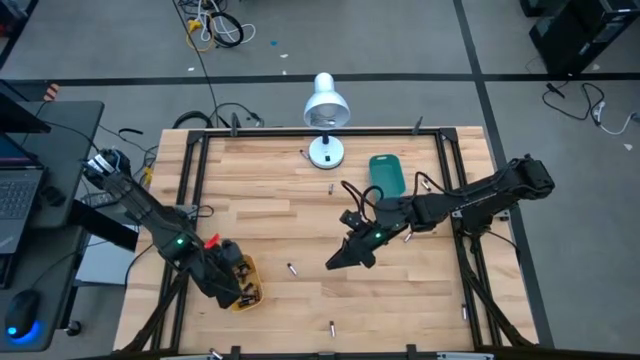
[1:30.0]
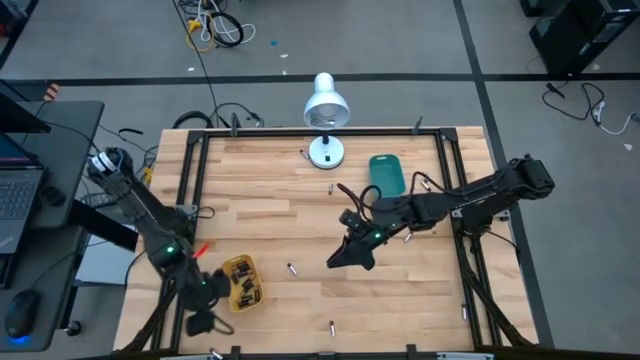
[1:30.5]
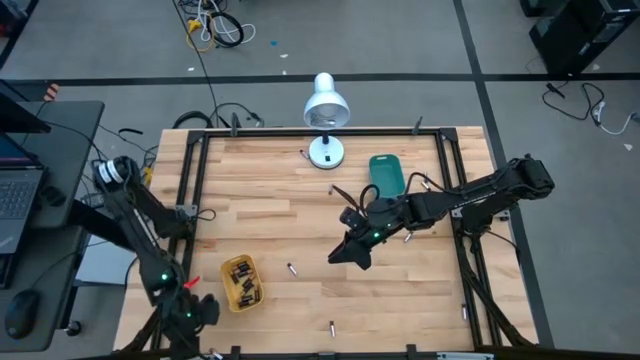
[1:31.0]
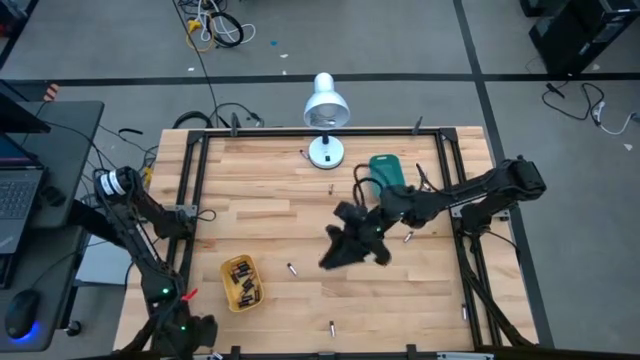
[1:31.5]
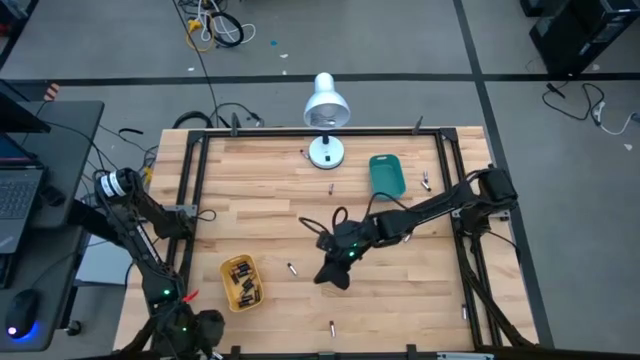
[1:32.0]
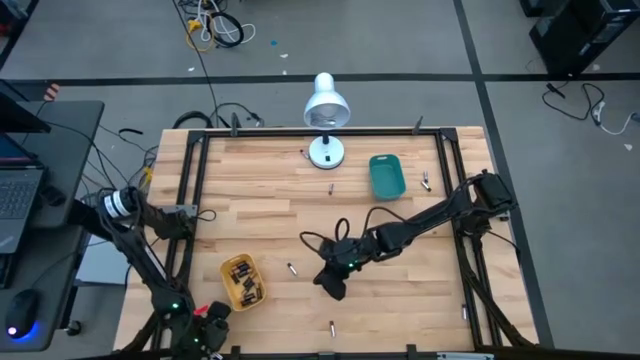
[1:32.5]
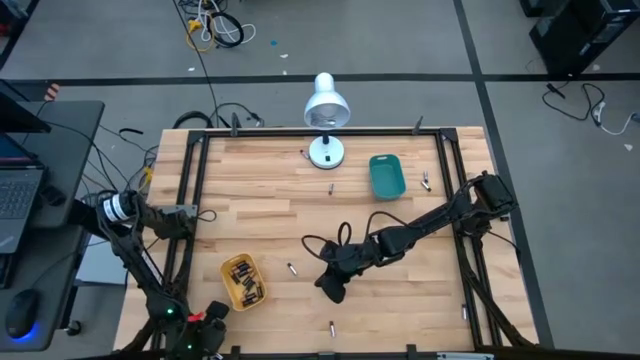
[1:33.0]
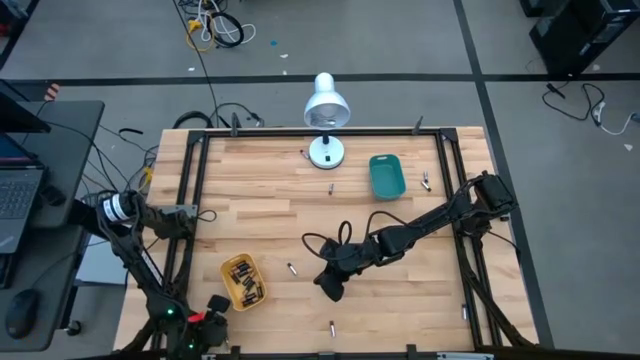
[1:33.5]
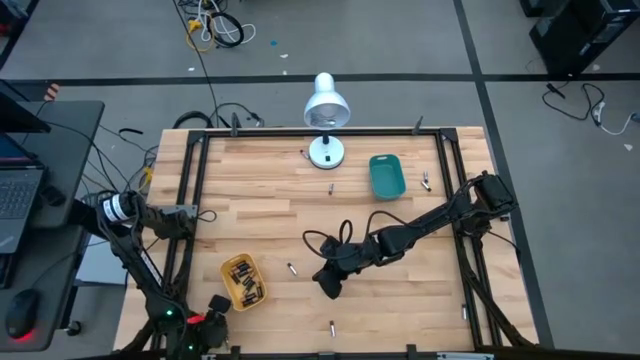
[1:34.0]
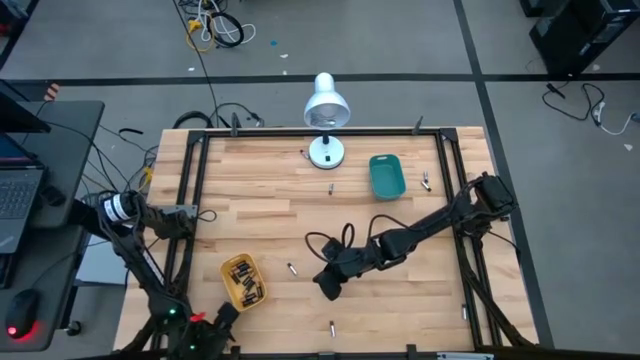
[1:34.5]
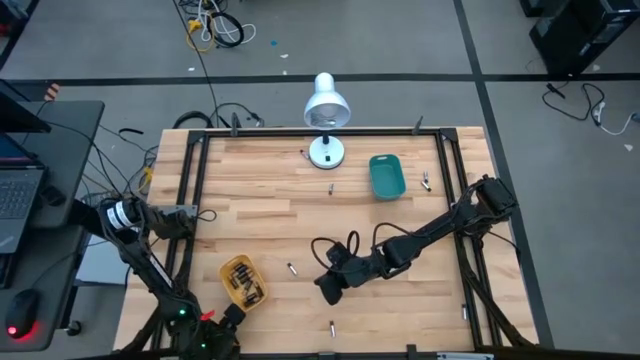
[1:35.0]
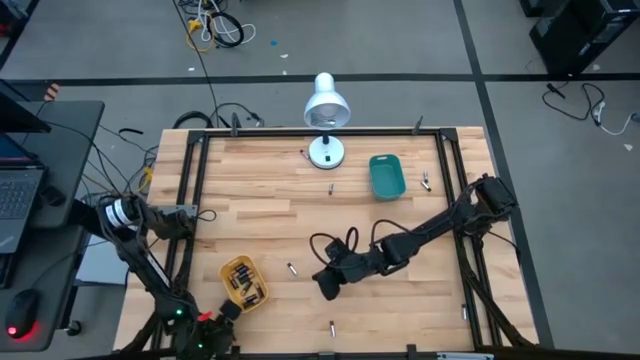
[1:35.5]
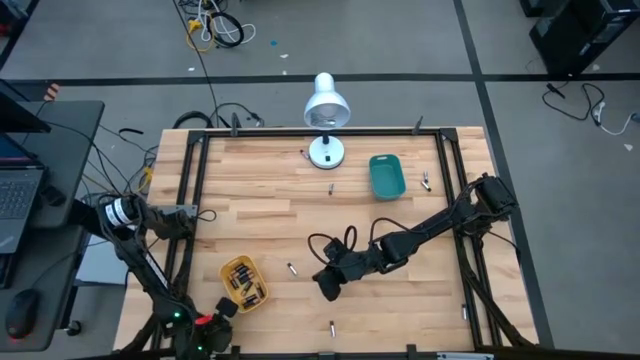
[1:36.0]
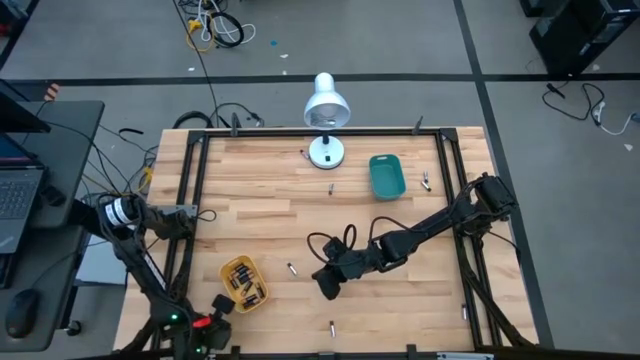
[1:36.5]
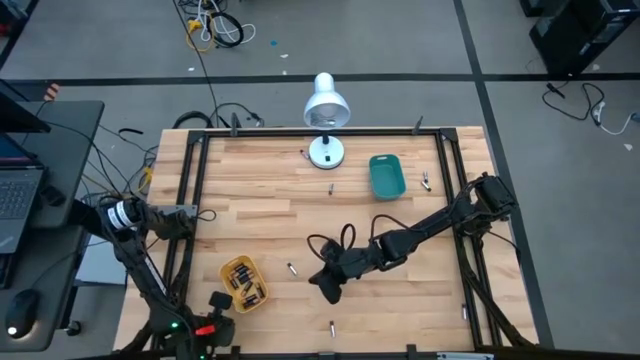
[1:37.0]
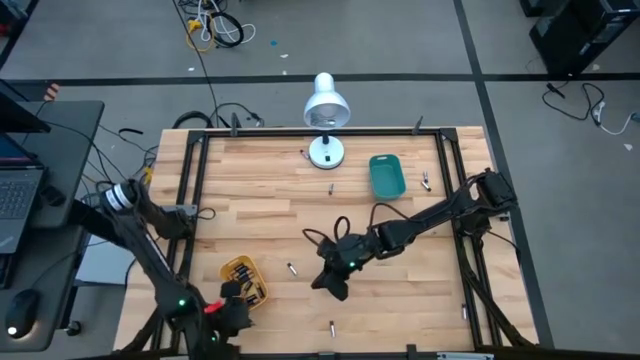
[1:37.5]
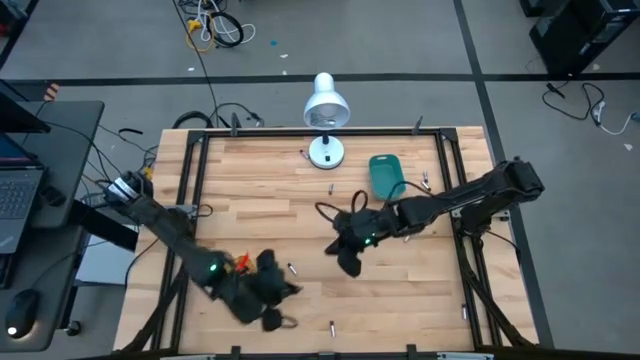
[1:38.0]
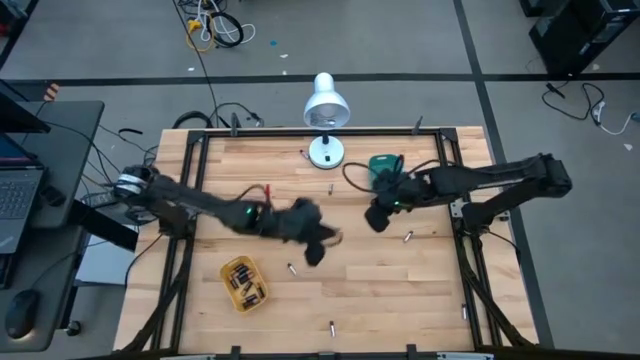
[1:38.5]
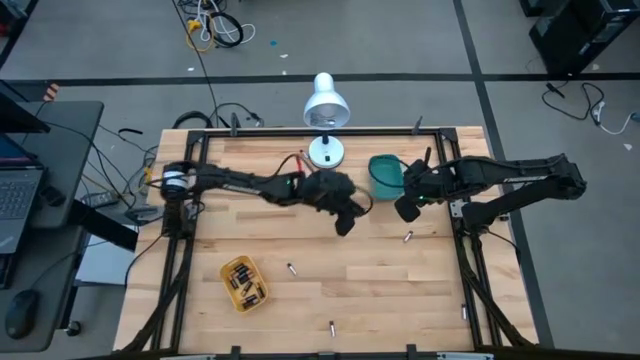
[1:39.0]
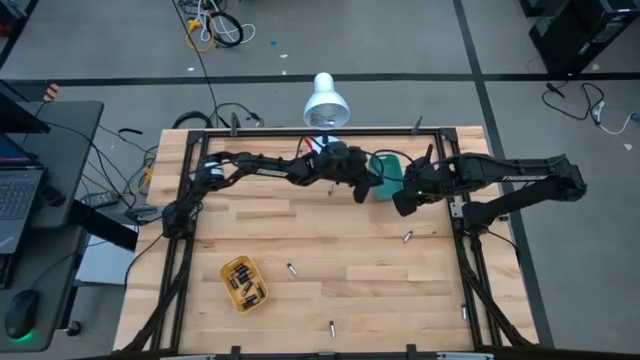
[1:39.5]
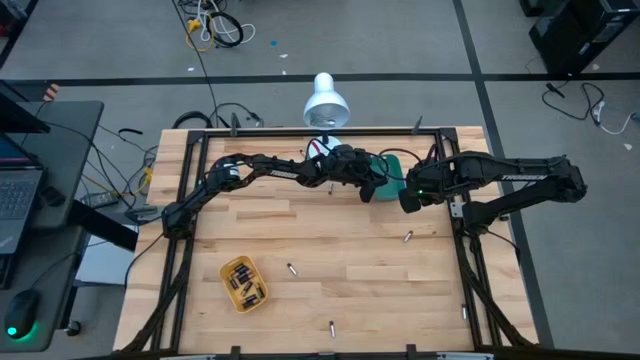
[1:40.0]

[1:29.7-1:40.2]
Task: Sort batteries
Put the silver battery into the green bin

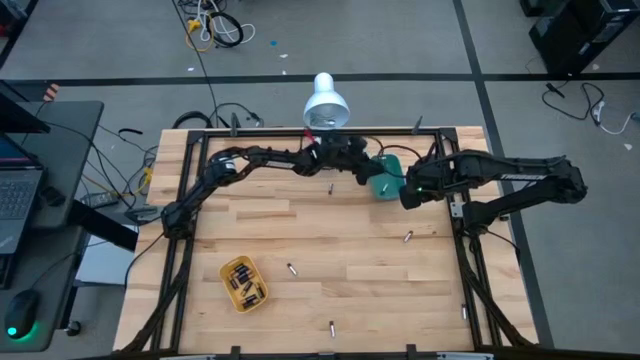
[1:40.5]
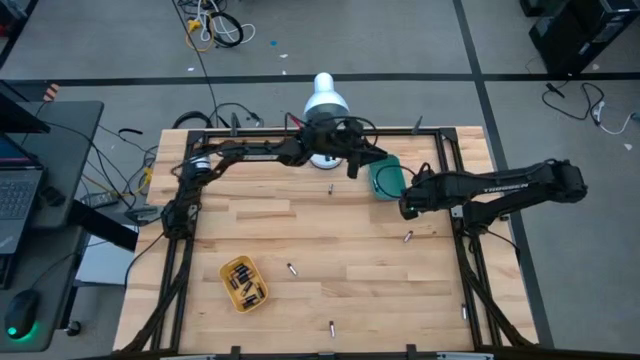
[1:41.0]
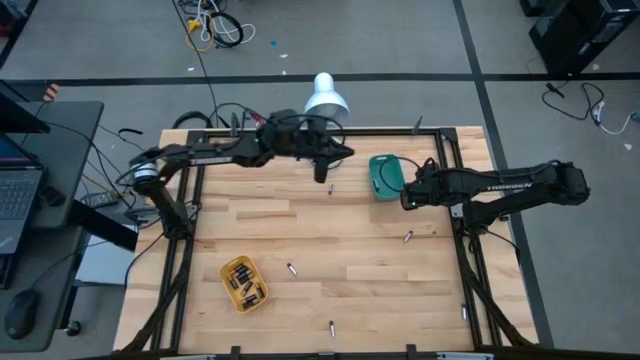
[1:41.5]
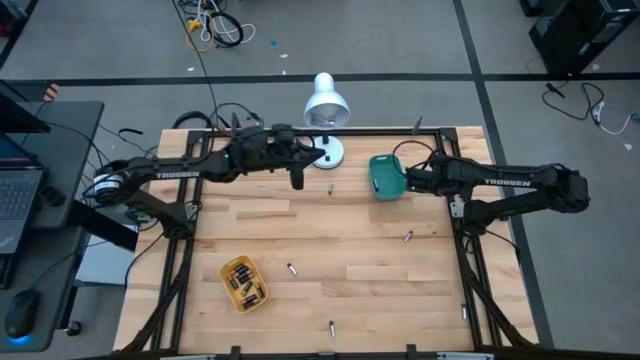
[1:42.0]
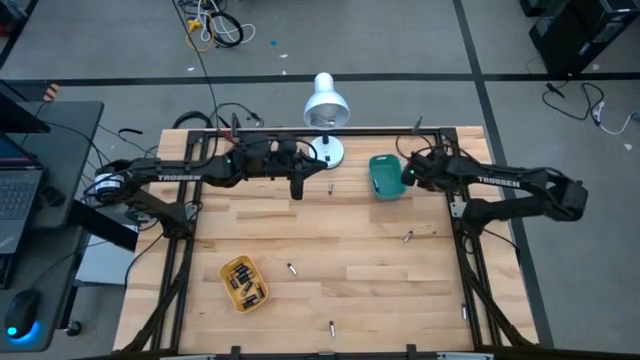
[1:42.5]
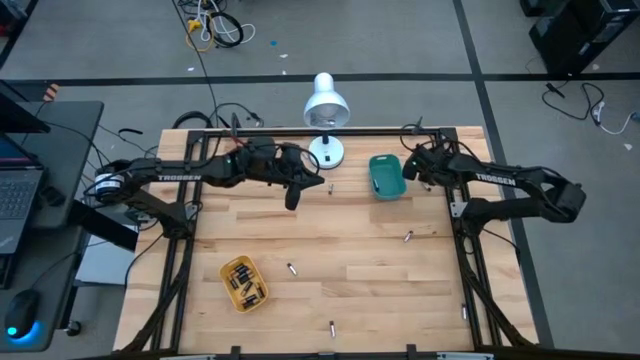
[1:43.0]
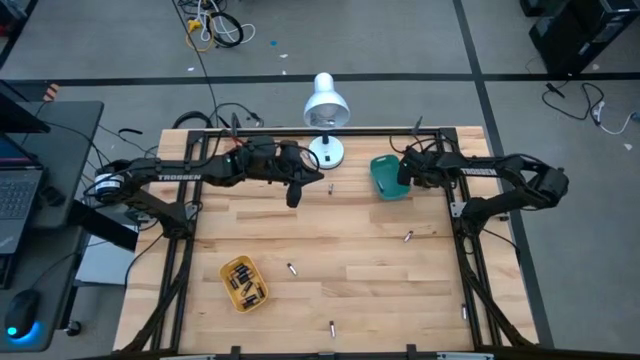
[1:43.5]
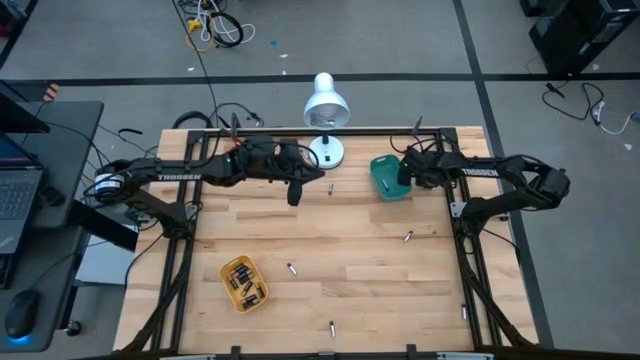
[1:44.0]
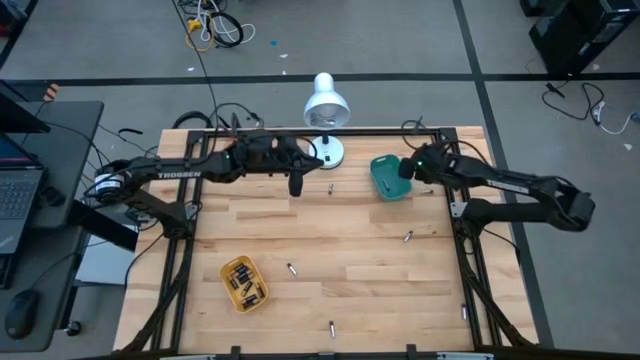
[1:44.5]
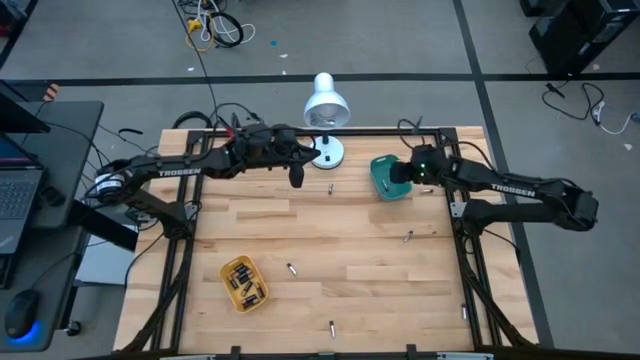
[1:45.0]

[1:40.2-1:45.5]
Put the silver battery into the green bin

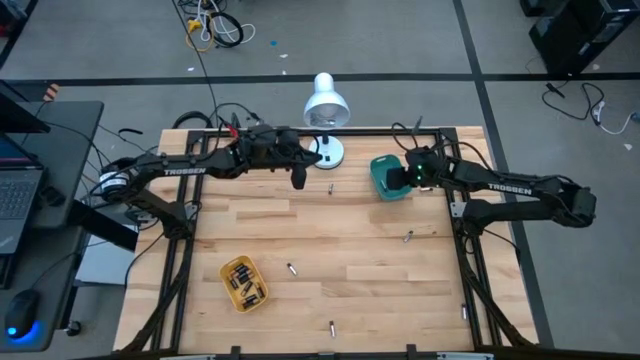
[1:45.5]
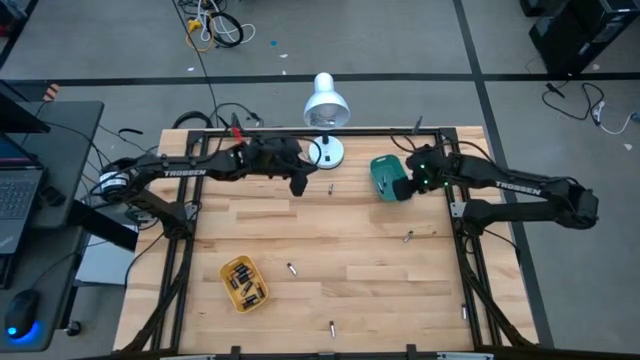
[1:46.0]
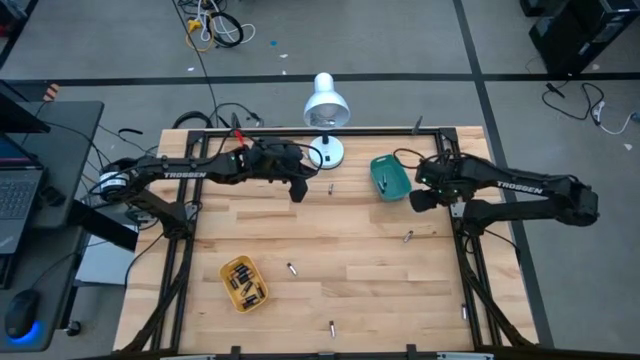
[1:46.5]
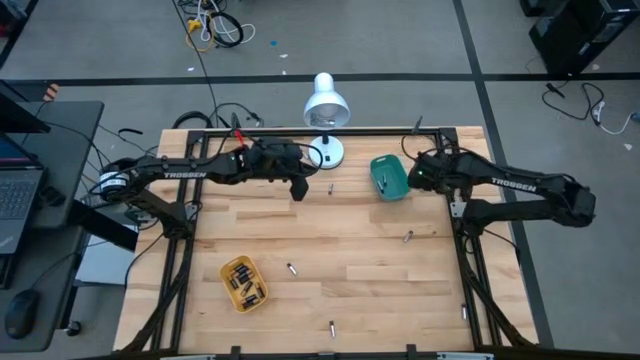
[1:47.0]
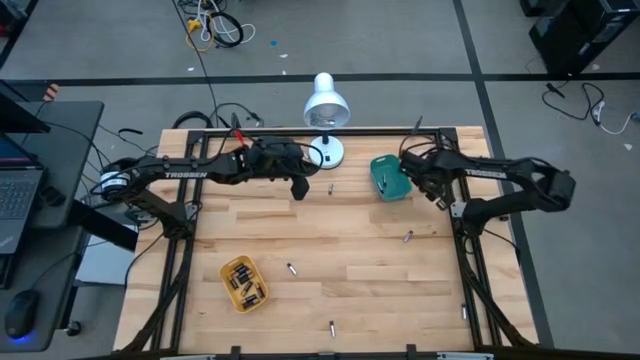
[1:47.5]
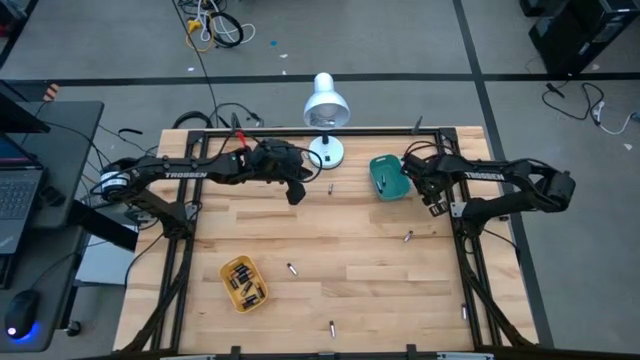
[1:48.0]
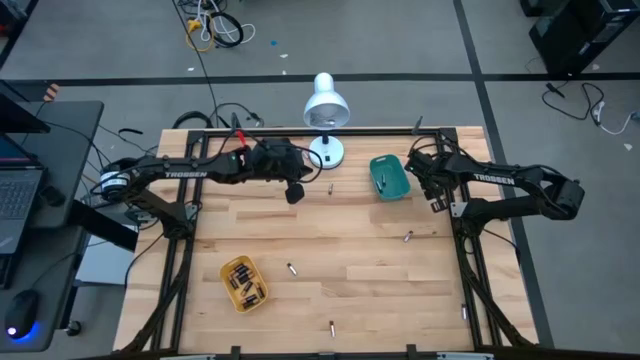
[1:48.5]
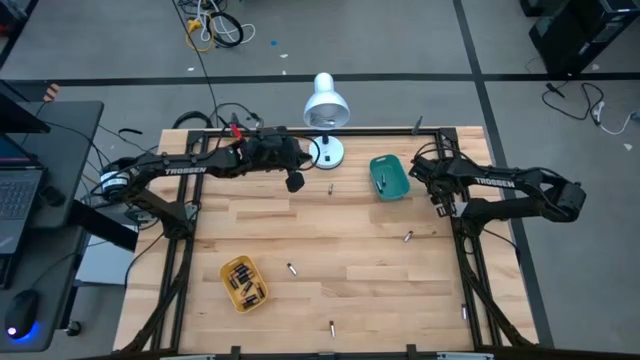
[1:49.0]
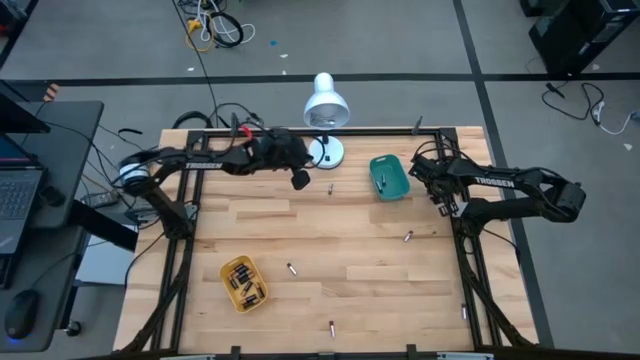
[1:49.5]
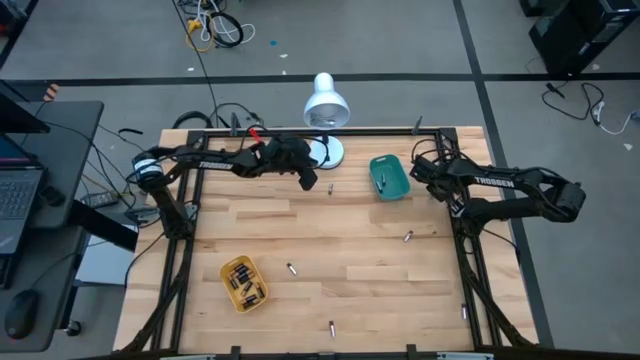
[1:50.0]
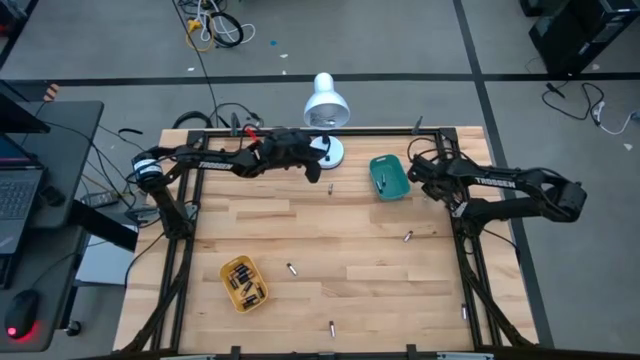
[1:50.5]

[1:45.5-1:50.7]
Put the silver battery into the green bin
